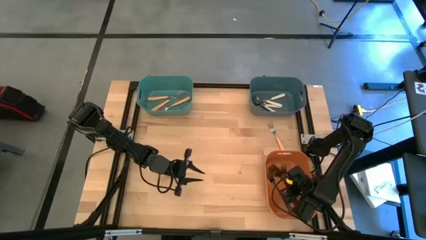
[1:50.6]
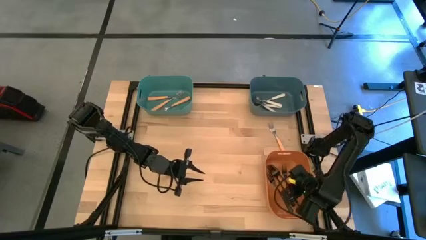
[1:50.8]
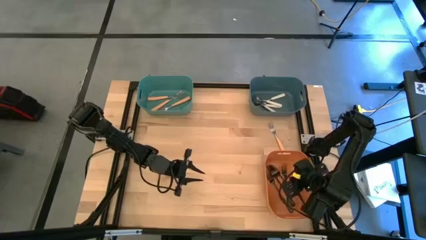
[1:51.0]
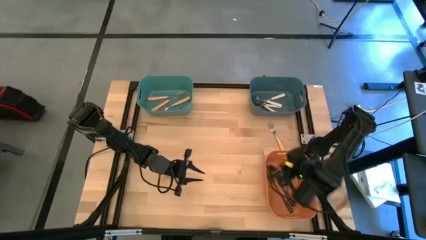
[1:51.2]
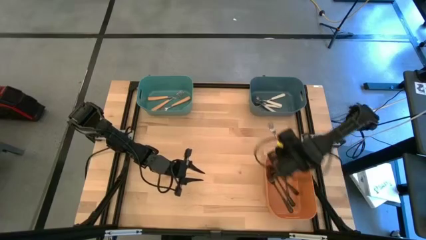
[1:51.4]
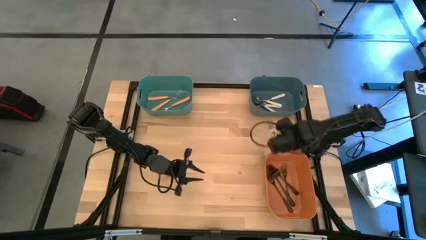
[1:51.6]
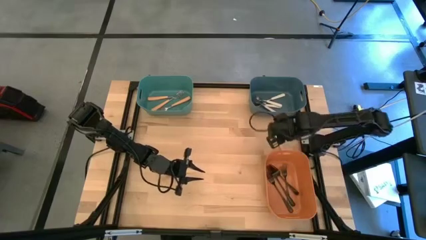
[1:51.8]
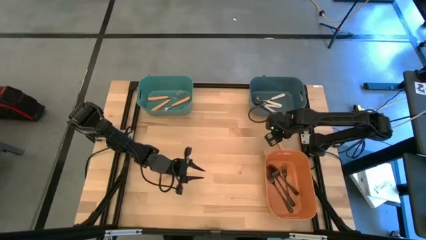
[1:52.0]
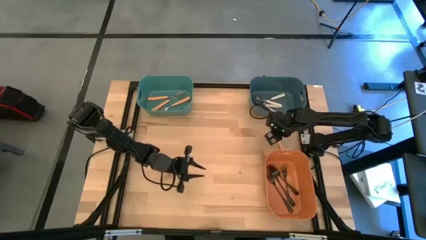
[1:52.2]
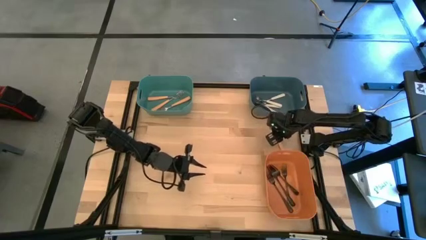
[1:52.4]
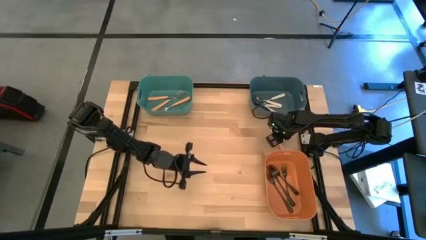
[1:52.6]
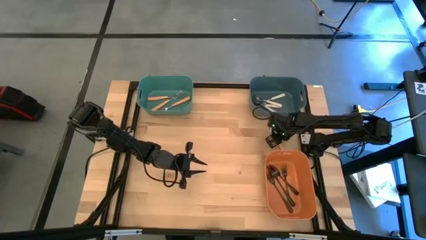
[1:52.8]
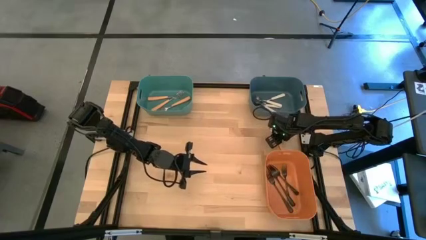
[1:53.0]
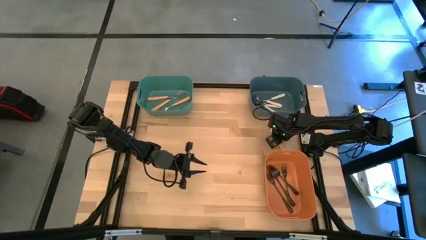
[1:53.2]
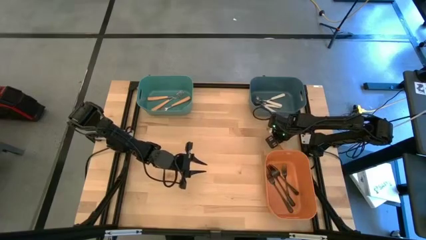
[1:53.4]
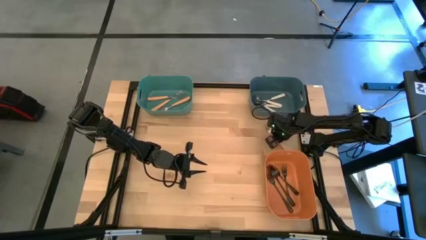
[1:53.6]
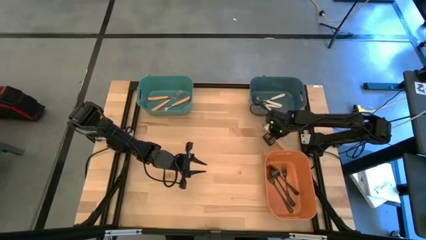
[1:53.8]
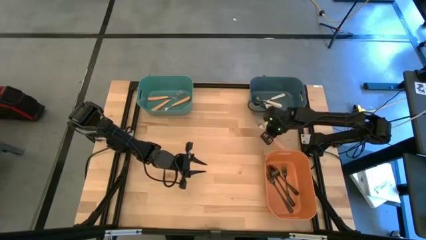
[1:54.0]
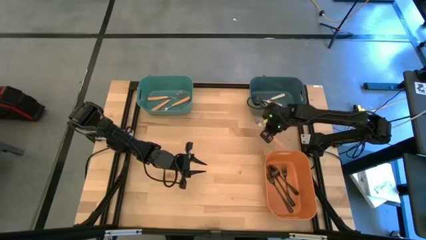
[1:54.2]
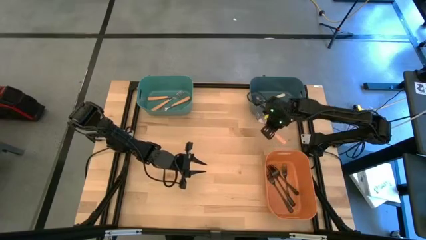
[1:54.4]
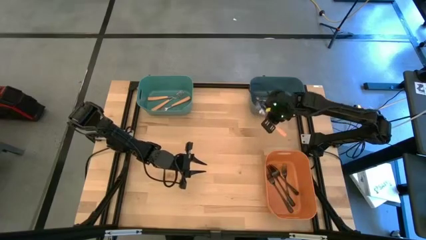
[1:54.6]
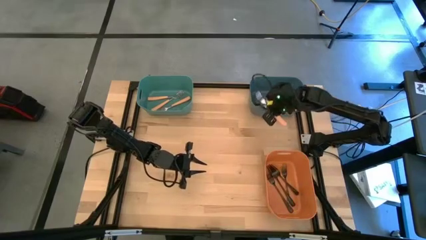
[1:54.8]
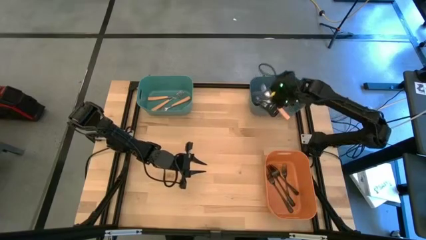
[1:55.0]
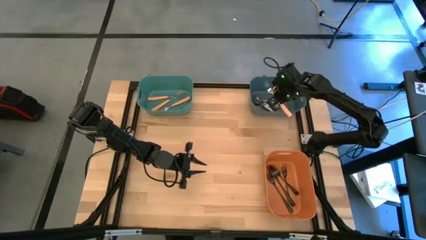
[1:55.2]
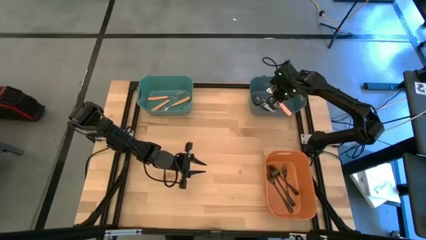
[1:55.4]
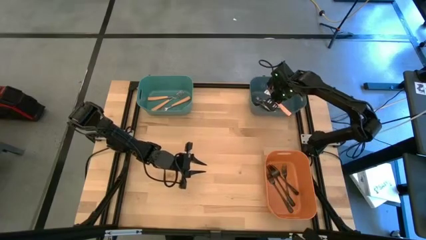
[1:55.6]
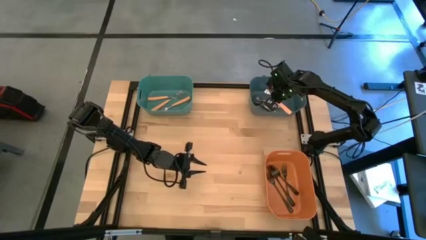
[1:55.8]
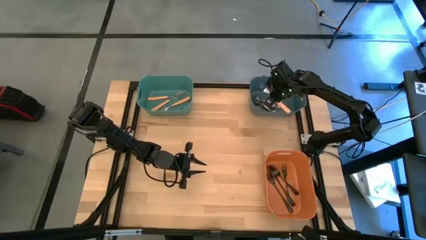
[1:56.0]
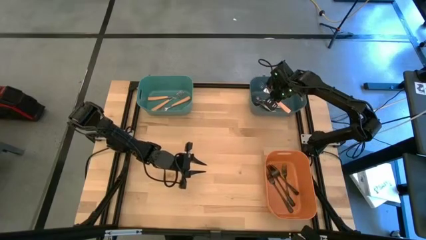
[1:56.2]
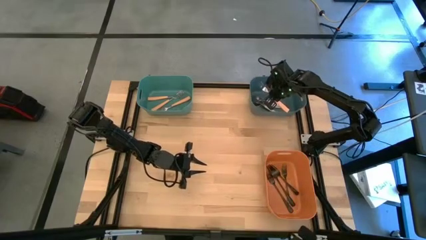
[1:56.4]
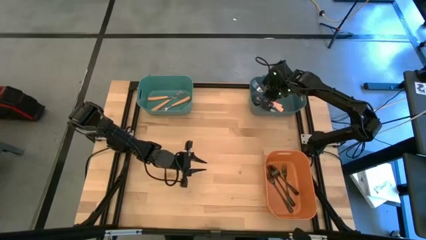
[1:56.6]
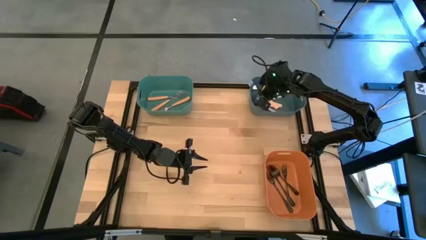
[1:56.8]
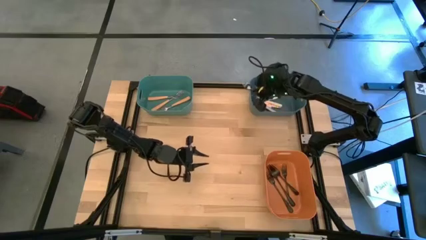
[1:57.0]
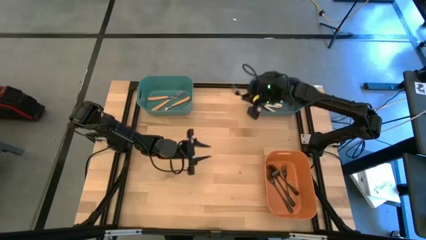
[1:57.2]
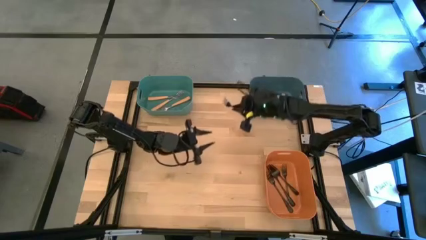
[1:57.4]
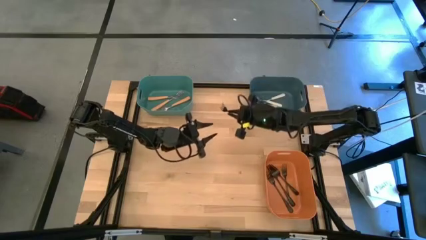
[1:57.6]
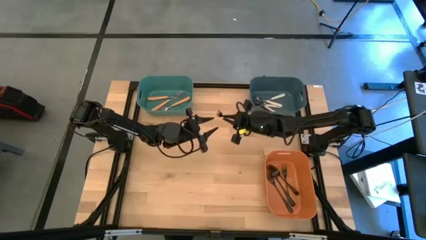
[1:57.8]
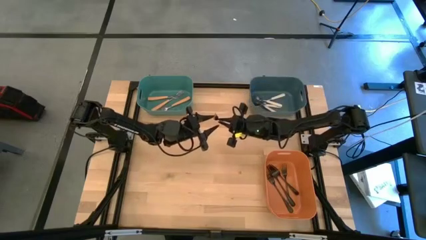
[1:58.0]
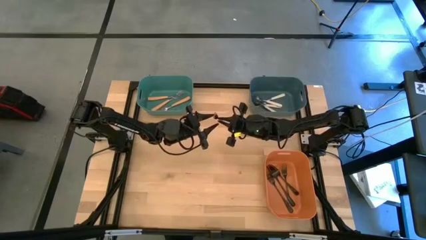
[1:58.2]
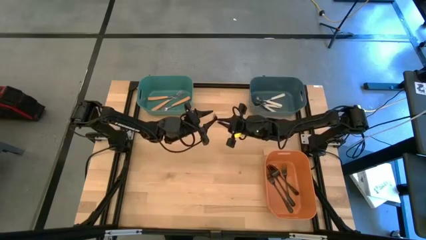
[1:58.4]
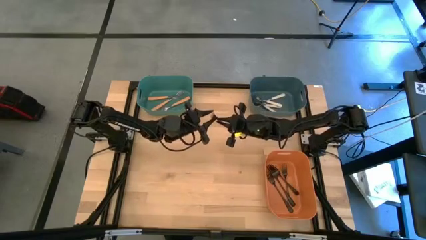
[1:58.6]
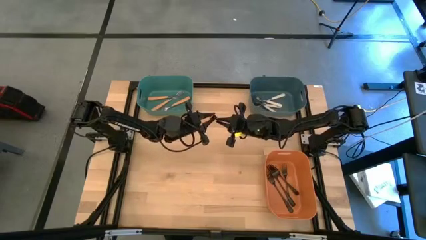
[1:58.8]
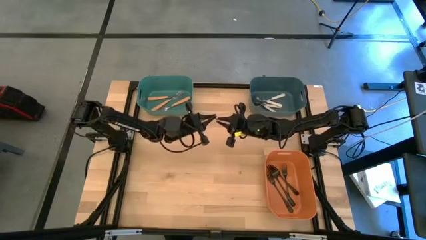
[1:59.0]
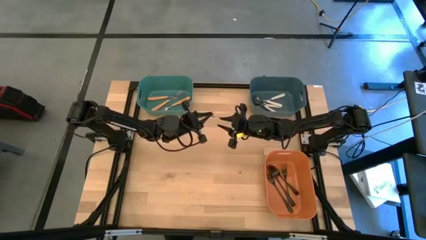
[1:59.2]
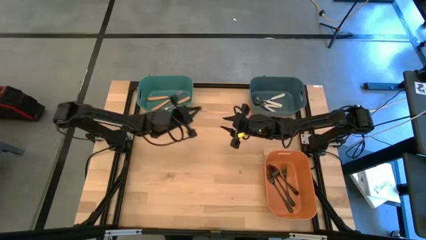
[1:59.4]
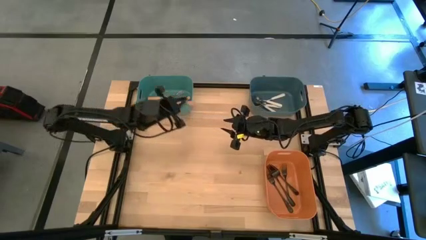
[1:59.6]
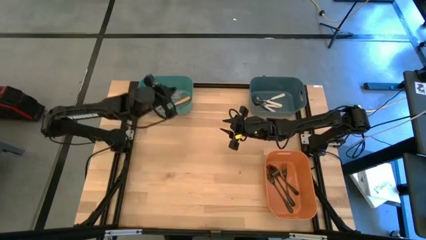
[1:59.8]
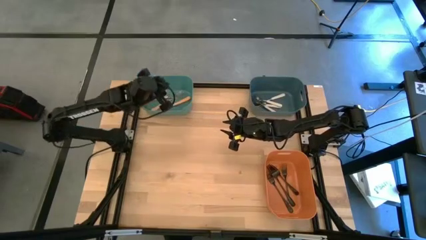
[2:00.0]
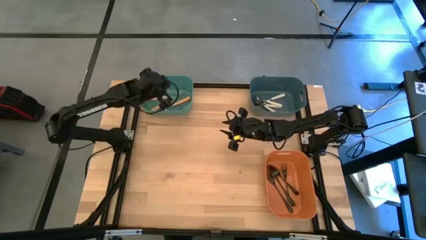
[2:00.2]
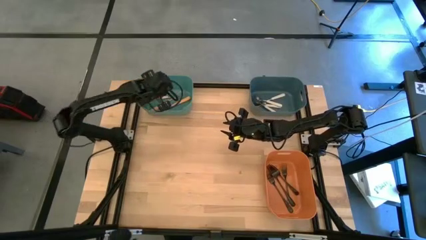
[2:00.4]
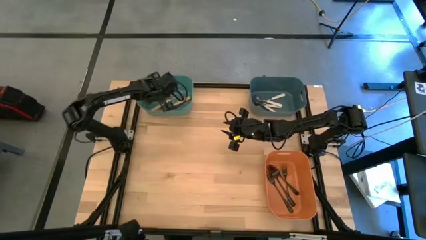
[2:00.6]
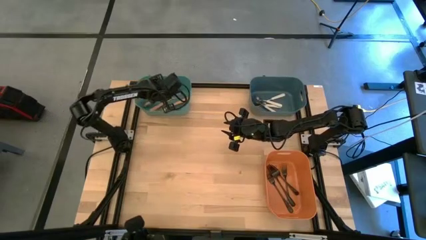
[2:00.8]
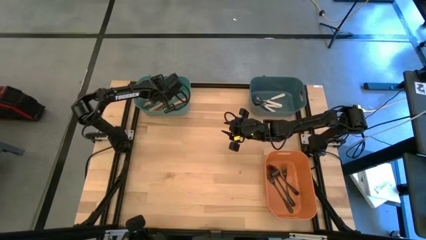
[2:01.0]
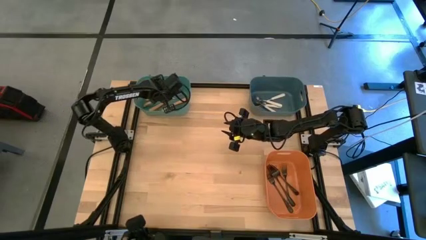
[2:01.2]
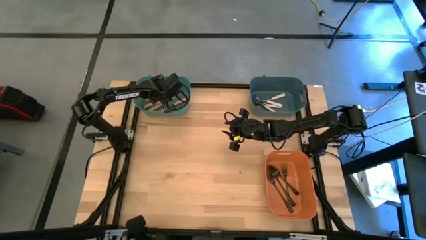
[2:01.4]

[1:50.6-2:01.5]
Task: Sort silverware by color (type)
Put the brown fork into the green bin

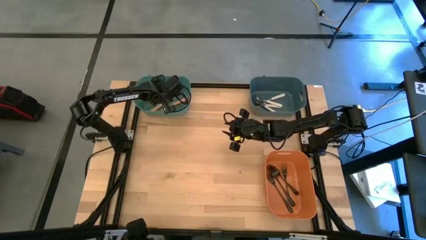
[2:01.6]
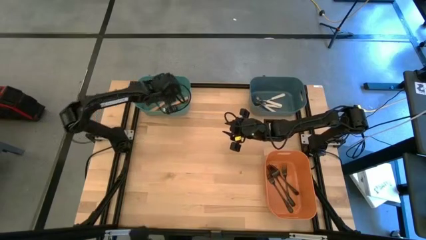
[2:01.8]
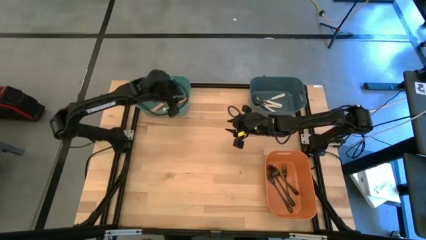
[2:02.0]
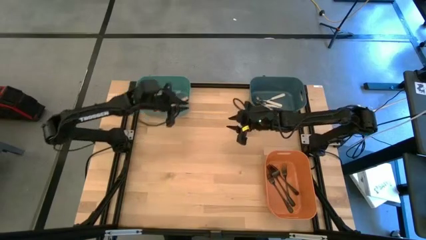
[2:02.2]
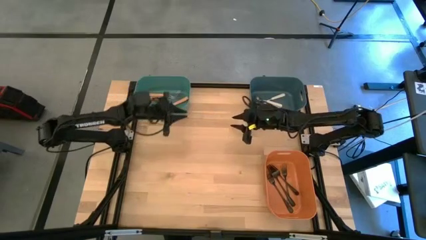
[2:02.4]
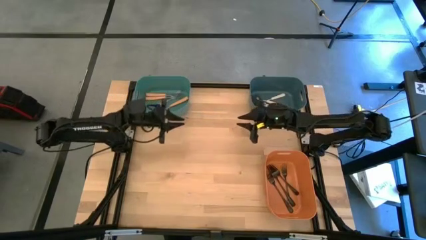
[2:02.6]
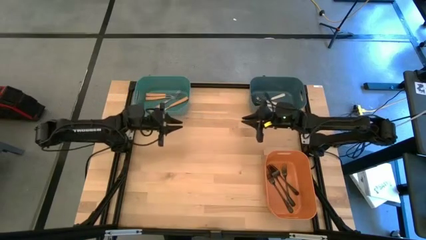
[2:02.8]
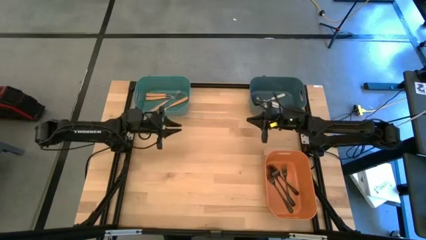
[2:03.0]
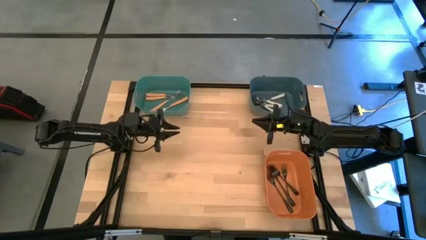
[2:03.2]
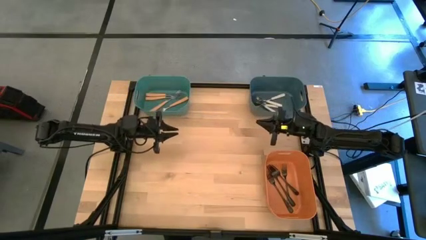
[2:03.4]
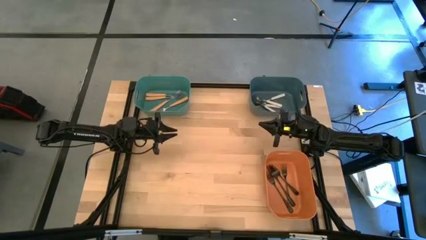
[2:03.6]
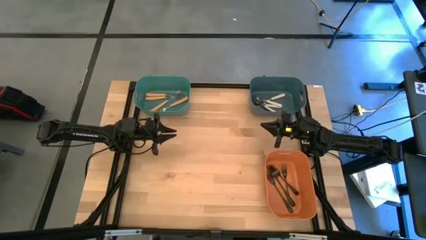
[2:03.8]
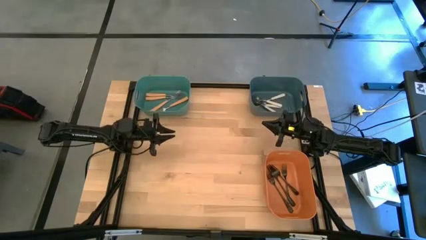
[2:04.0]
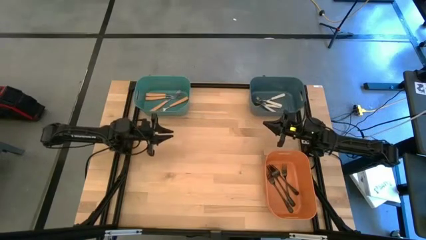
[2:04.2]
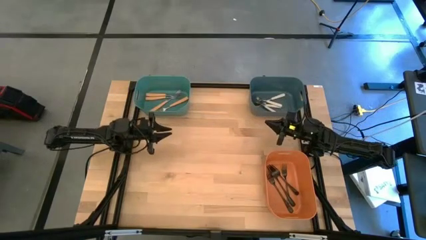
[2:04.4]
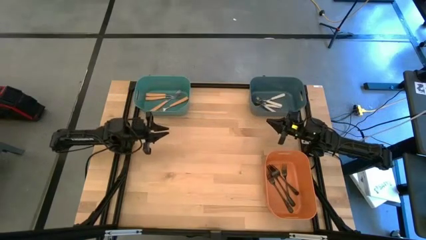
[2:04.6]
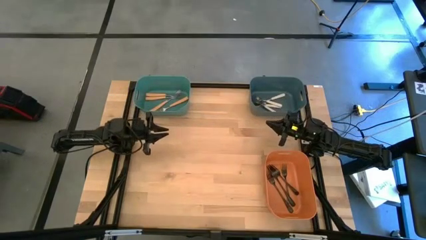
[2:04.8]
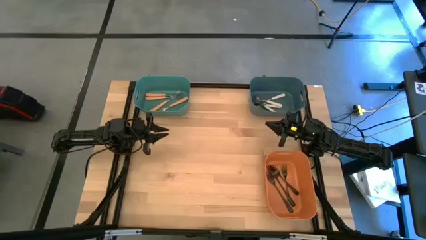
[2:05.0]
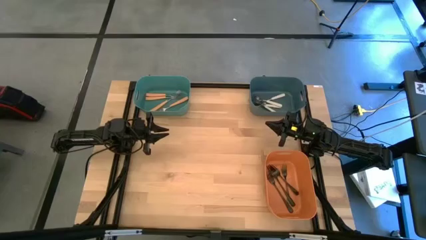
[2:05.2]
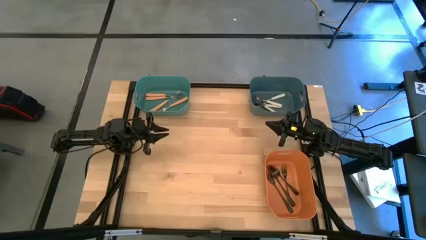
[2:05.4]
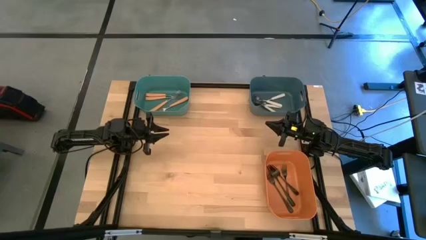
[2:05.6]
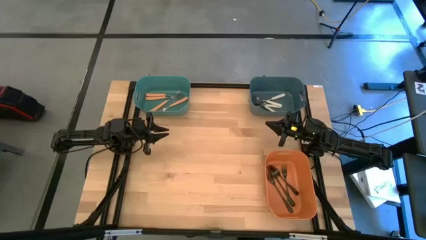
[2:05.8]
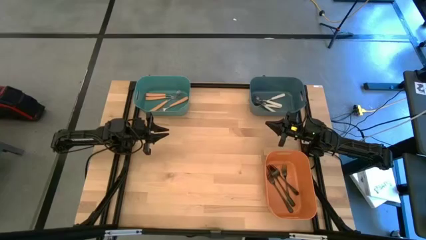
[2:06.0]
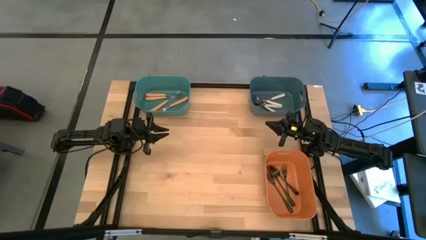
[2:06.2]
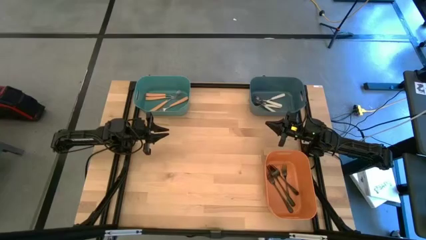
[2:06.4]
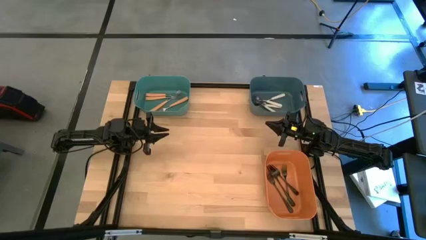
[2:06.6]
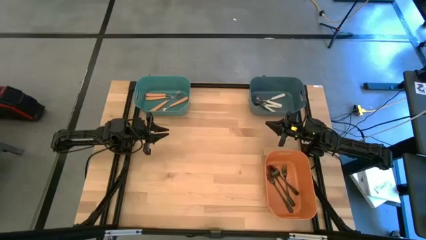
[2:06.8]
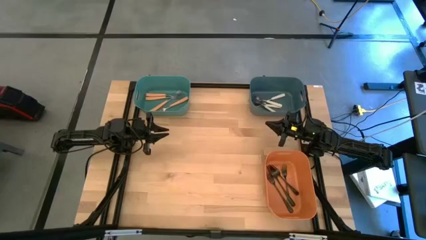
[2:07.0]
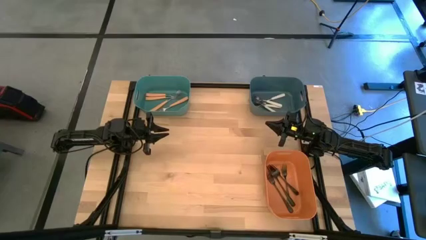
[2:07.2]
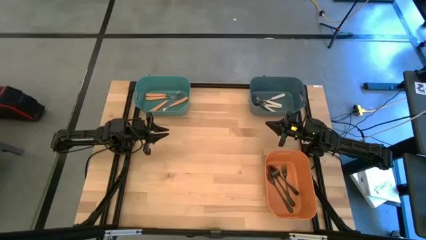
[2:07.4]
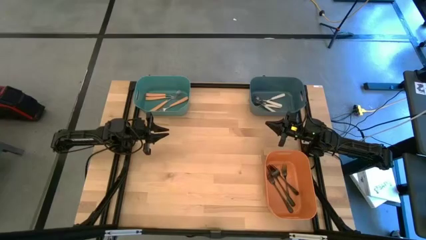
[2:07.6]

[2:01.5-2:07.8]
Return to Home Position
